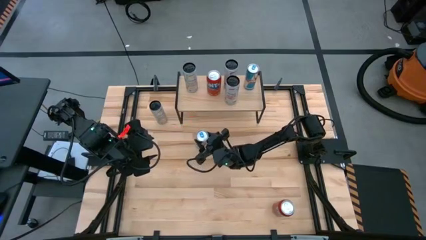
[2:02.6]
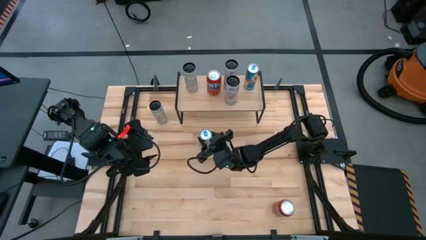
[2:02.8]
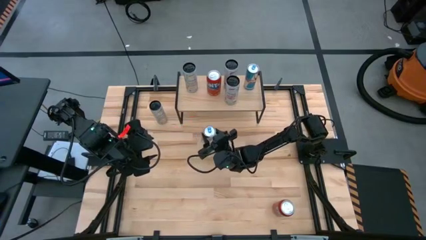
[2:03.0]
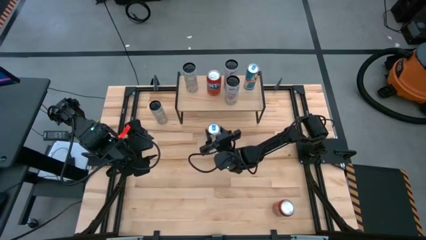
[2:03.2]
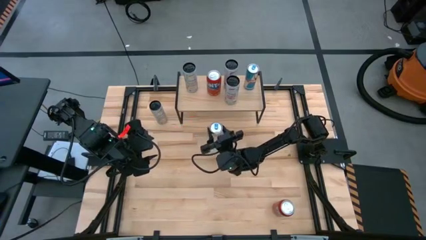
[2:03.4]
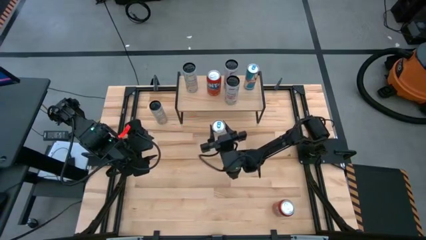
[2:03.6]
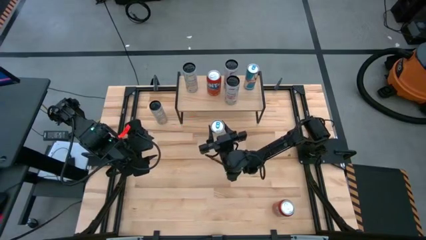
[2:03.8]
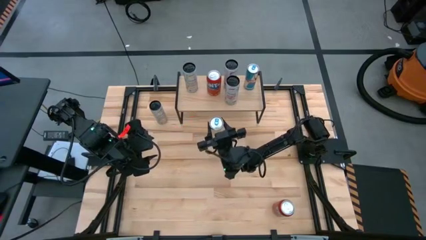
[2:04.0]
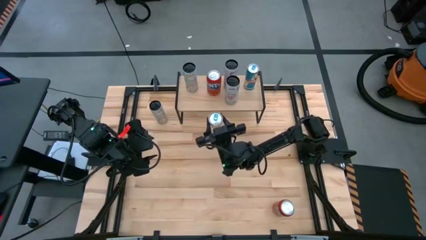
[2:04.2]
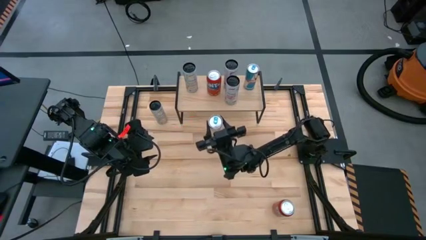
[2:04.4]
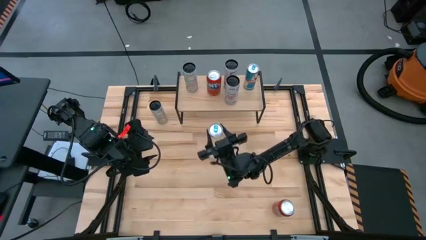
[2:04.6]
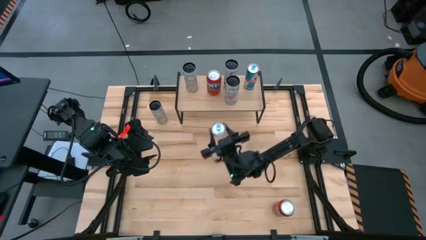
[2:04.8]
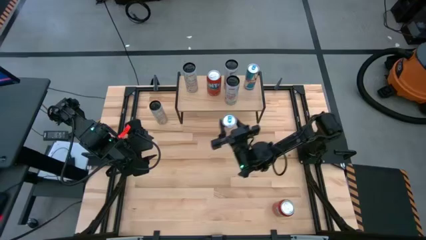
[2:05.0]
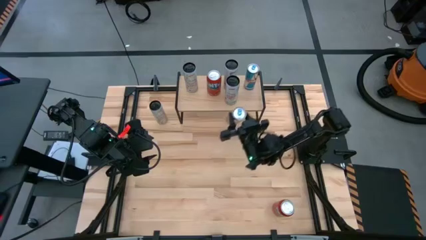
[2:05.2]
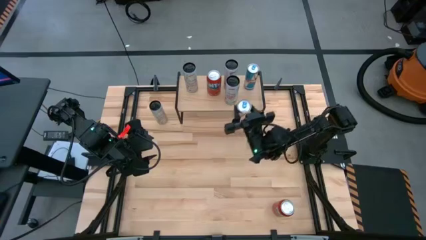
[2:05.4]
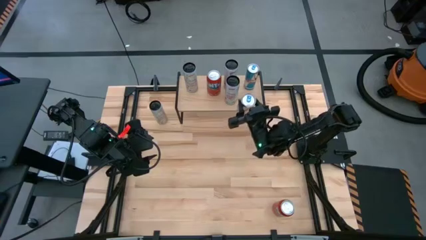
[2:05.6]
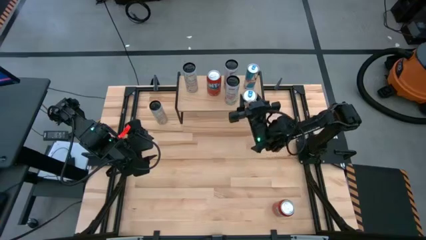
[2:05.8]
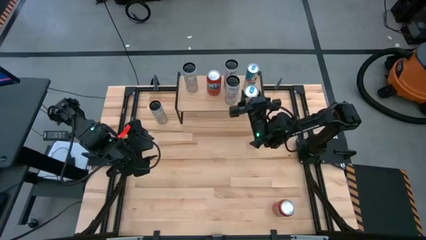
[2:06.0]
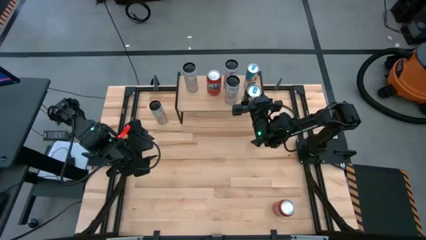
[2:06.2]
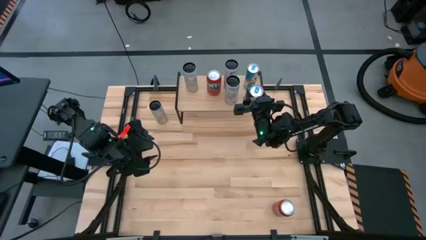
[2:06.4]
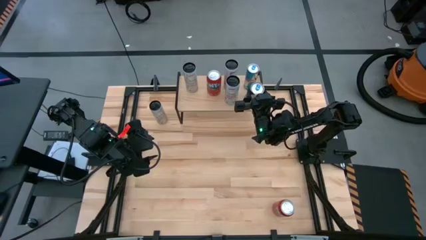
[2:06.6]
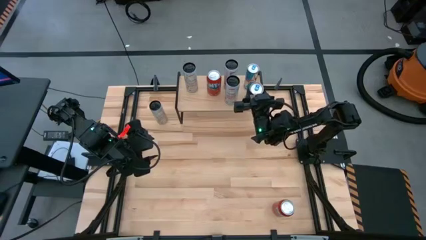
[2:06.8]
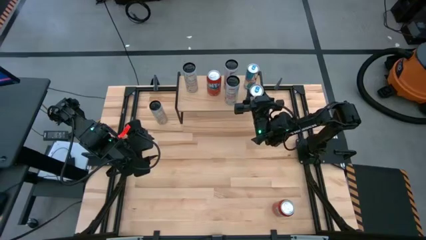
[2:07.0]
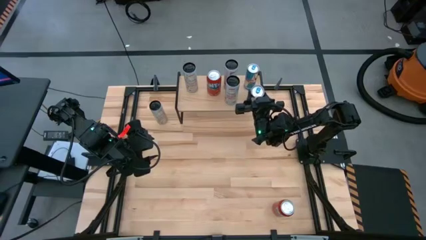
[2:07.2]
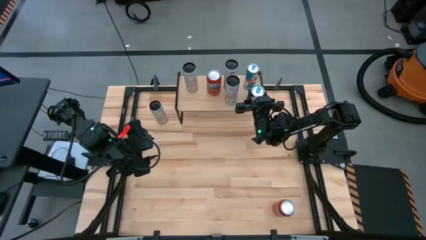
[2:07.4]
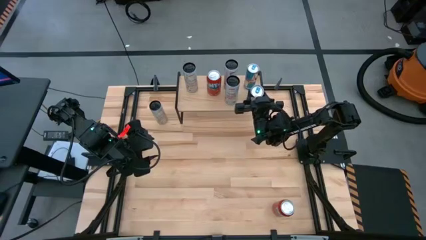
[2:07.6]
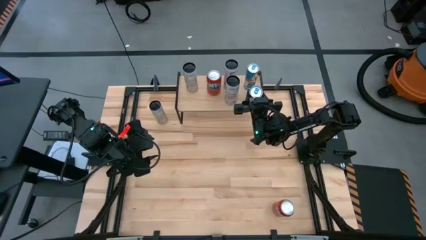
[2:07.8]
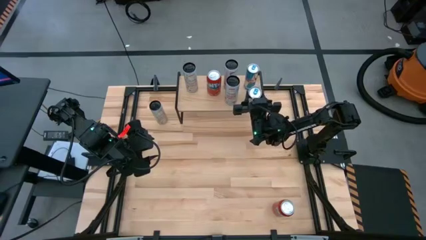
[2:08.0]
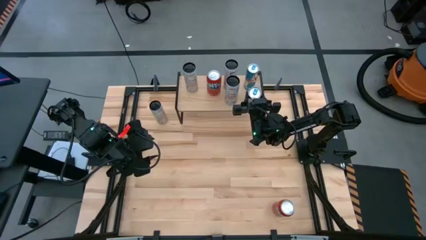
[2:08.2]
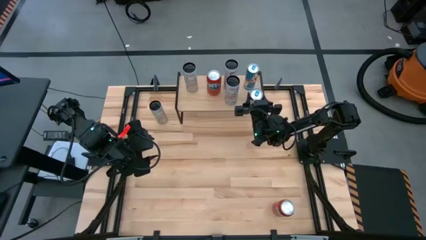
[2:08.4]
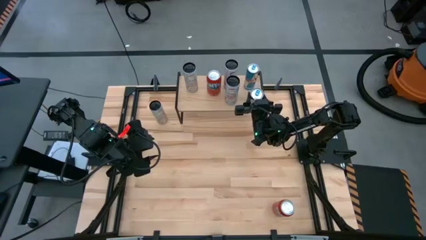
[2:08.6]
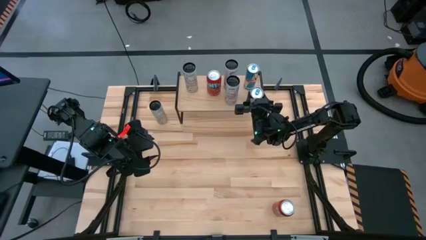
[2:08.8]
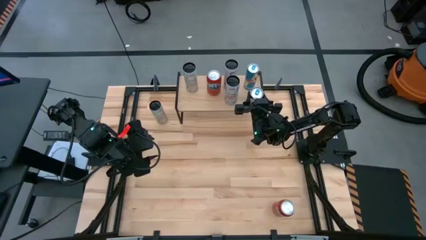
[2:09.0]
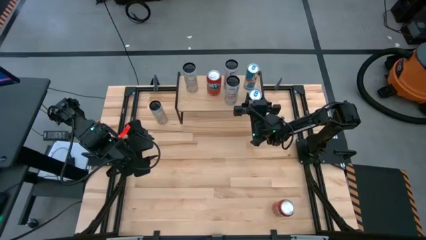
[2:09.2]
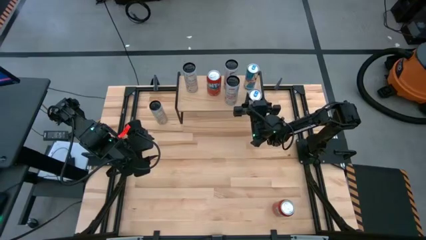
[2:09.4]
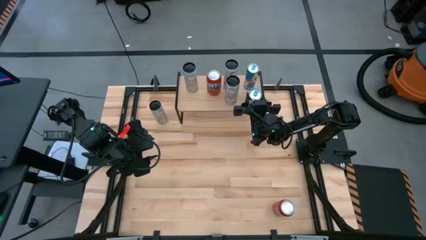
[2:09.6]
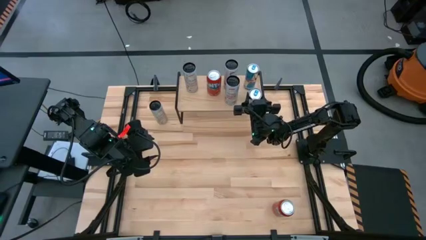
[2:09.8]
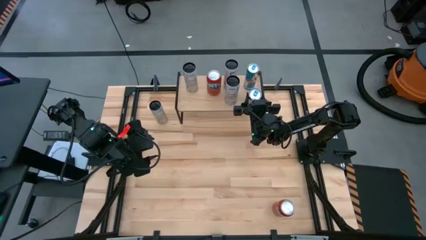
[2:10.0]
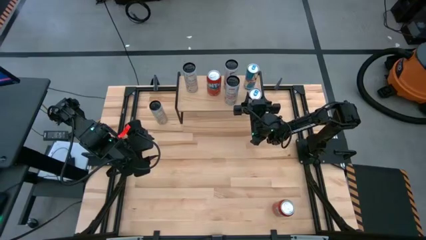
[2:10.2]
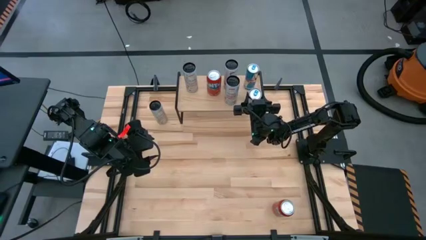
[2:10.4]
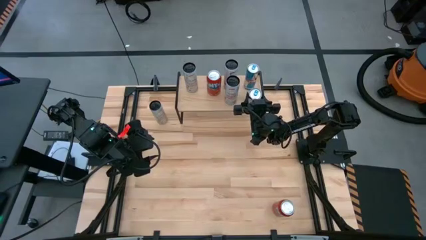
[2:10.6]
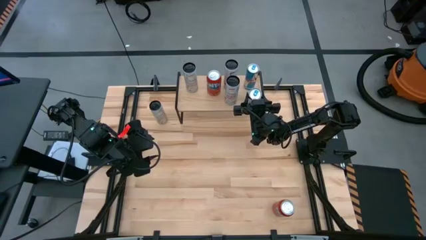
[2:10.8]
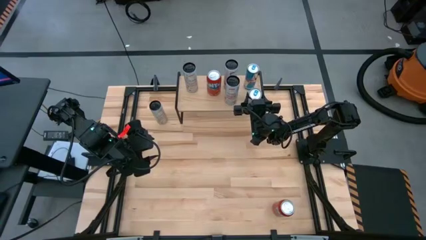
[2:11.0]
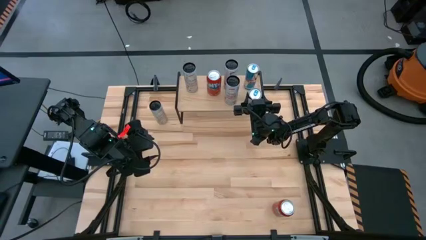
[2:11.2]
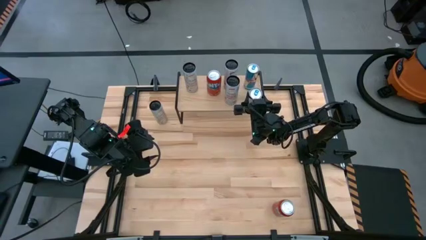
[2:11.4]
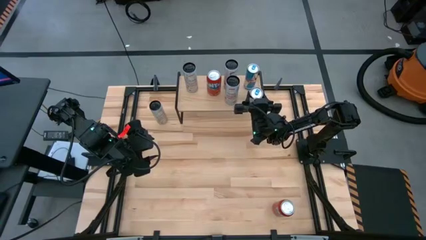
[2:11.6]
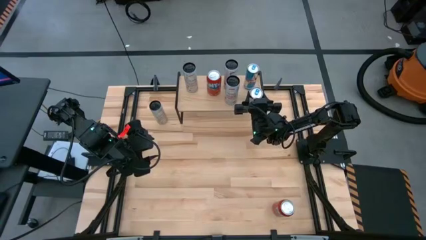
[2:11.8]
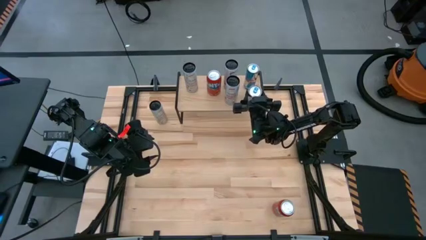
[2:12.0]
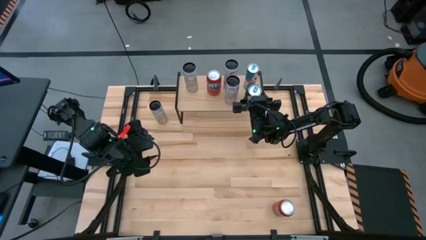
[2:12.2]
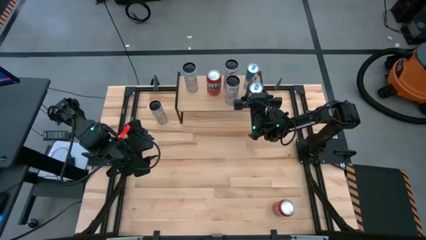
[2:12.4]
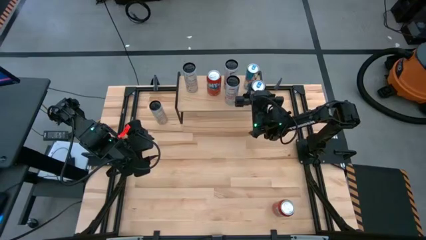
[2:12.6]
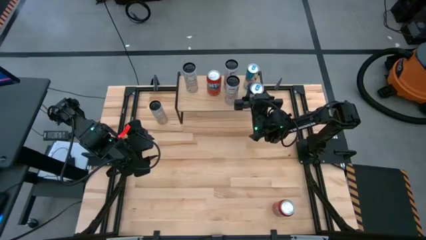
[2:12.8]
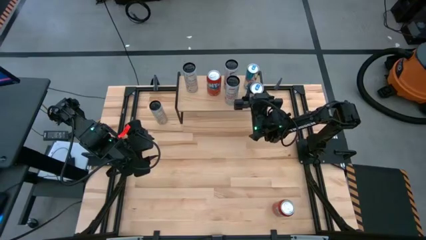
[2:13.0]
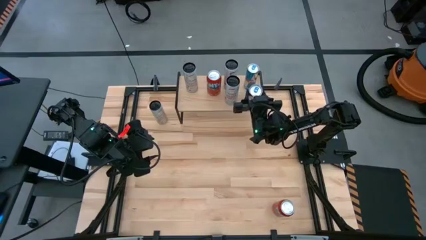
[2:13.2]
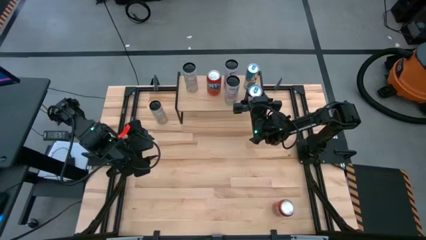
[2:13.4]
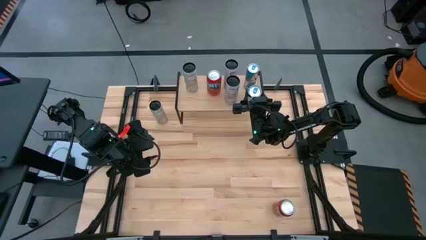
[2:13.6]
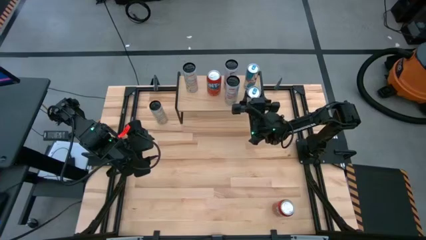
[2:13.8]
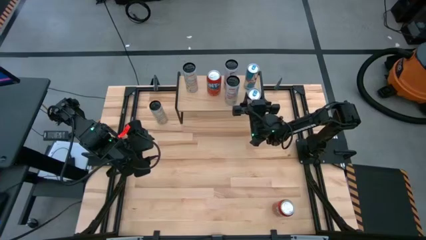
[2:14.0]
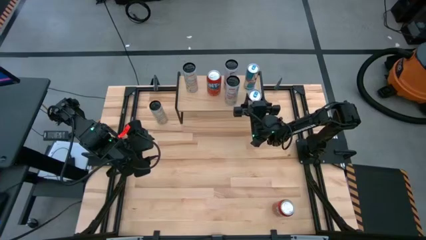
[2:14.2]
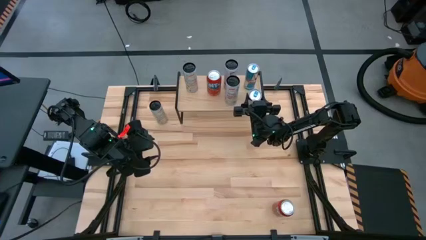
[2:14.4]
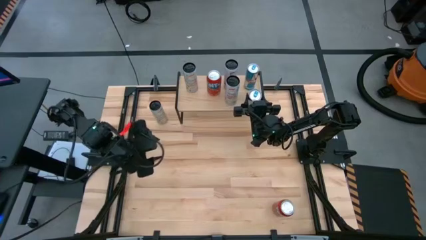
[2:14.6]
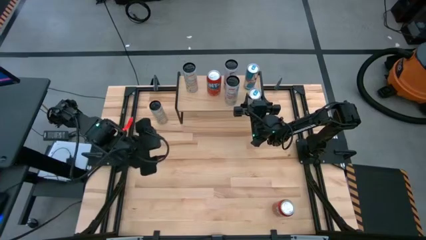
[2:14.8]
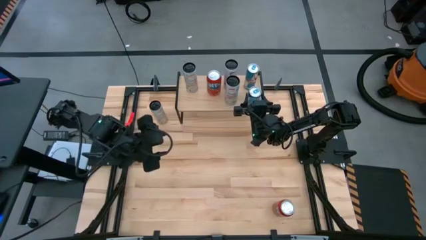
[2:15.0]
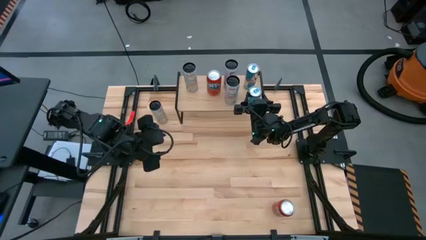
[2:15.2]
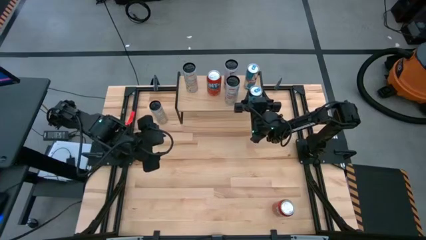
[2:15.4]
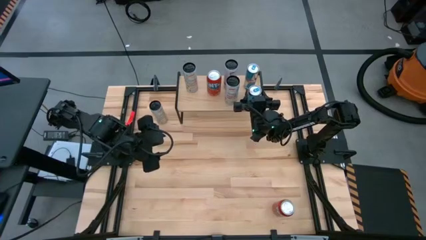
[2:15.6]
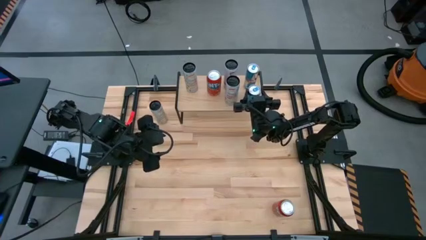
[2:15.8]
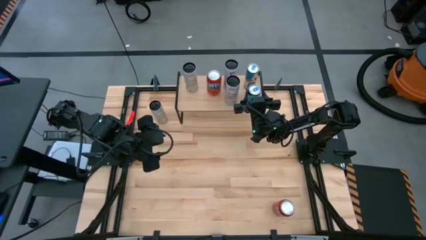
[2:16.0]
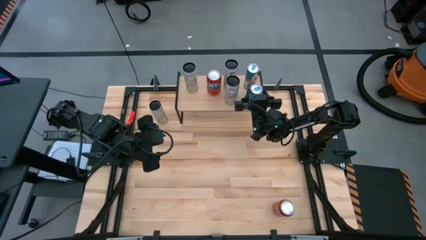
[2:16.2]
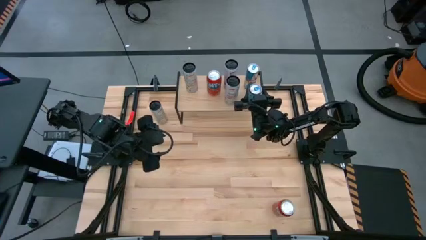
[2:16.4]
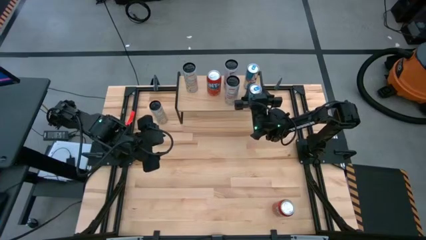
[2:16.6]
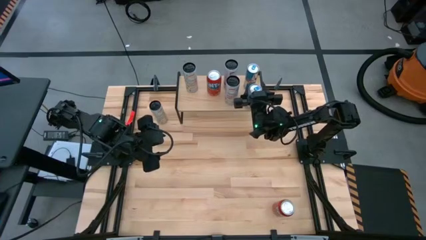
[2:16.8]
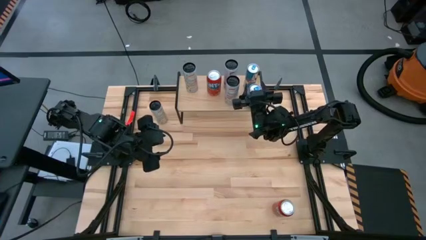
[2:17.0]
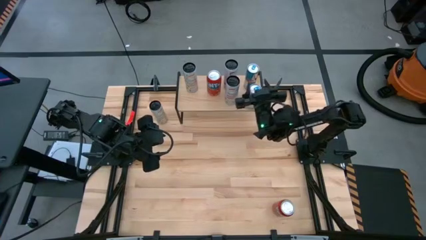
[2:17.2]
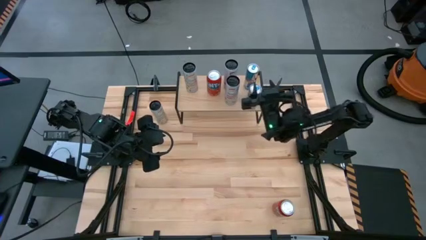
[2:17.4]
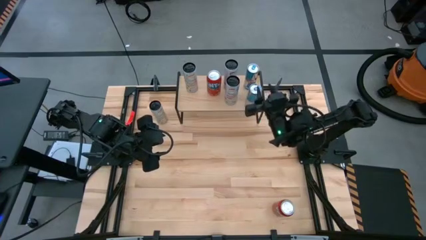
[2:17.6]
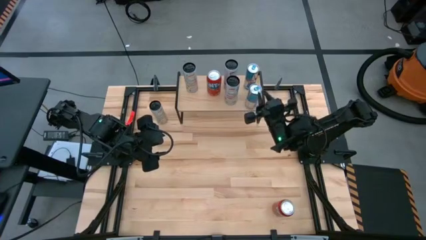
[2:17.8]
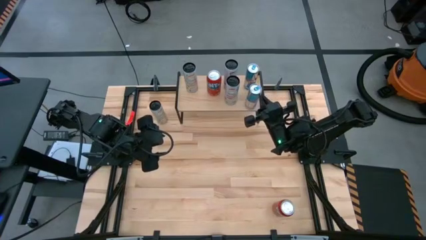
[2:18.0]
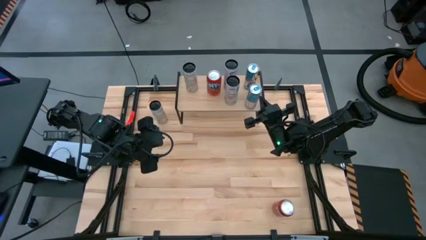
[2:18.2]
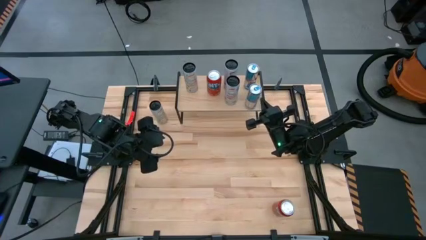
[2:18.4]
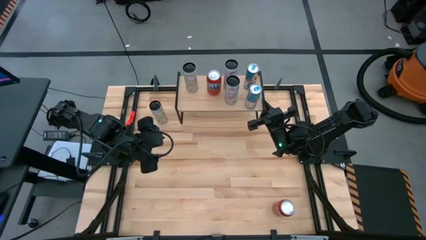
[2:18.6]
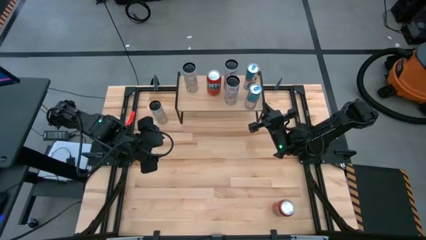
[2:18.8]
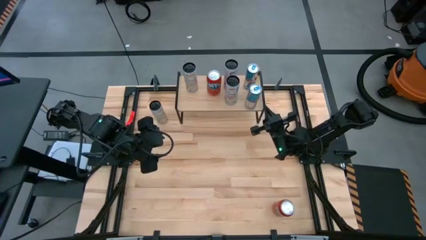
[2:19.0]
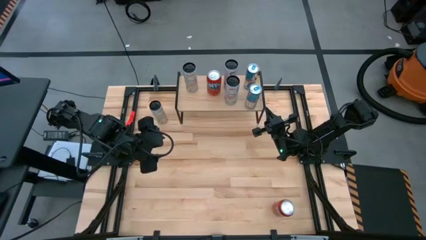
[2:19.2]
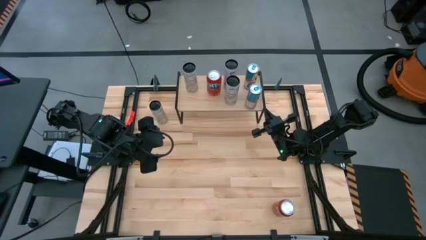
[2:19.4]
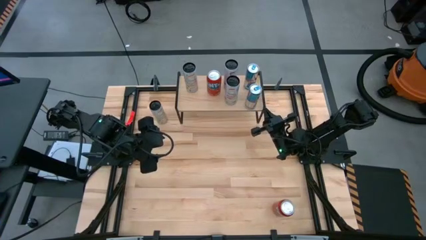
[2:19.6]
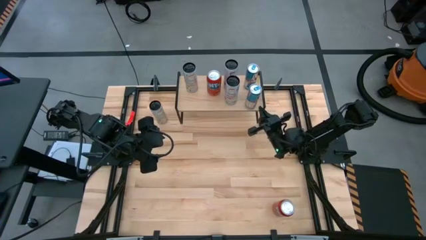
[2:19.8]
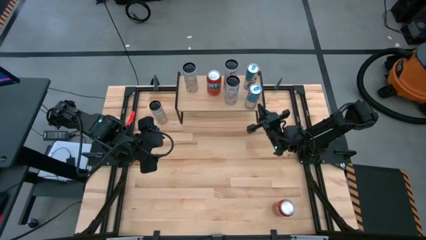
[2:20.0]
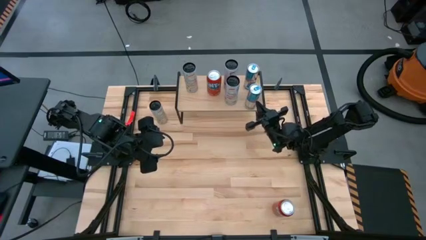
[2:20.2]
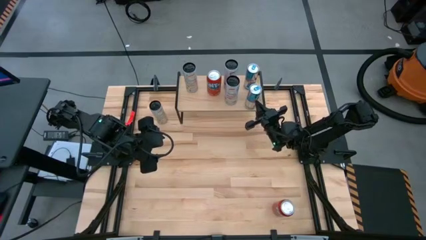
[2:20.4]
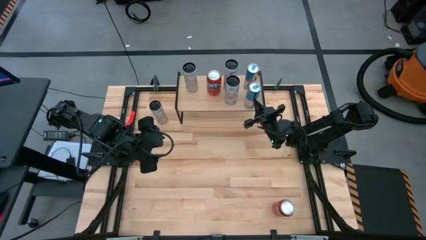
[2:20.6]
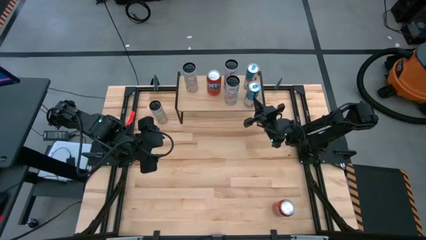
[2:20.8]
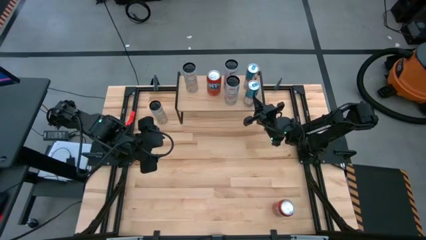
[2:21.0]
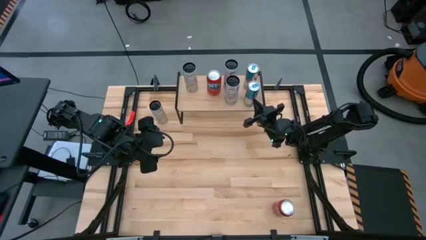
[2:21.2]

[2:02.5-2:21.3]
Task: Place canned beverage on shelf
Put the blue soda can on the shelf aligned with the other blue soda can
